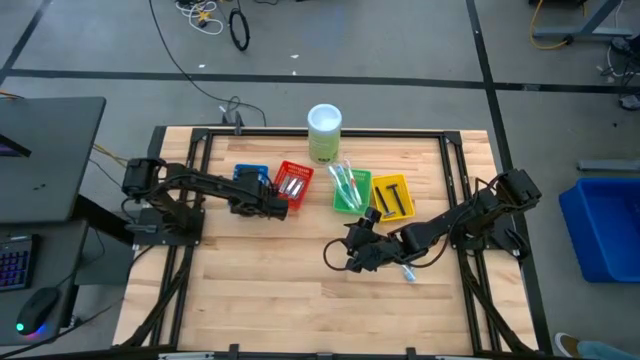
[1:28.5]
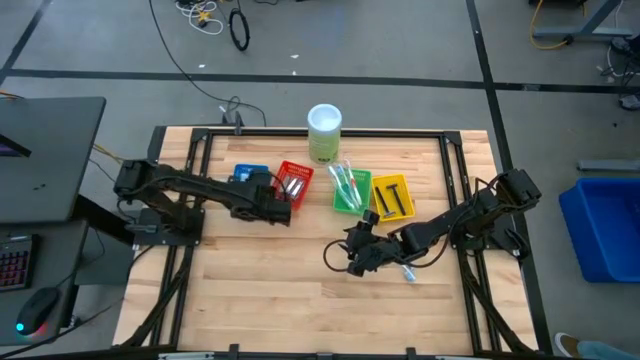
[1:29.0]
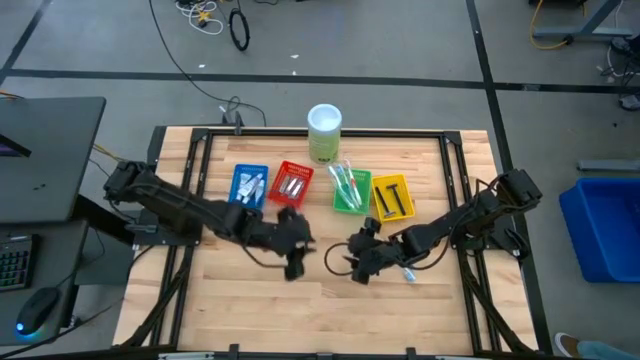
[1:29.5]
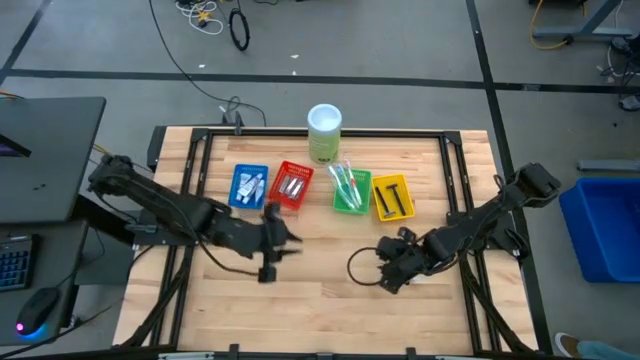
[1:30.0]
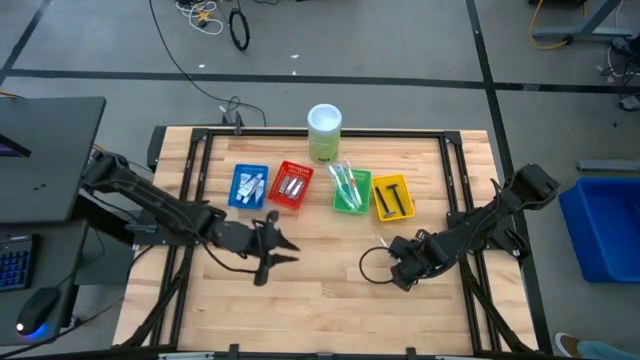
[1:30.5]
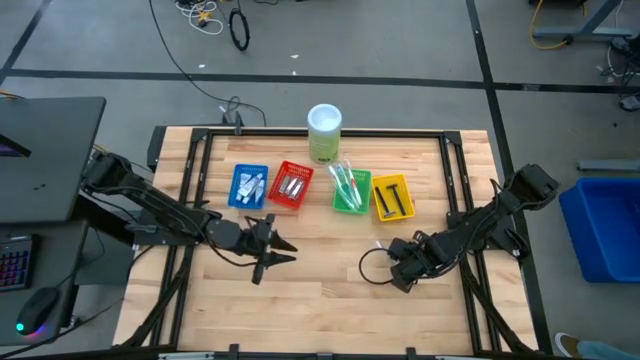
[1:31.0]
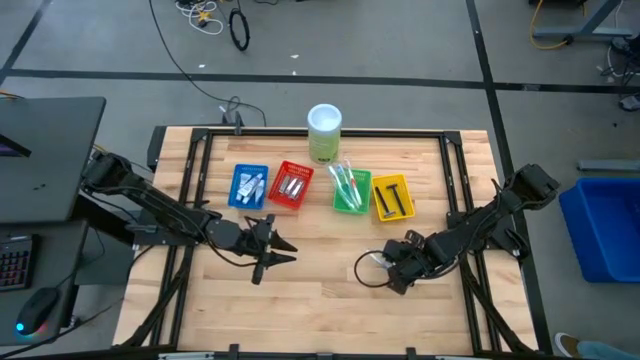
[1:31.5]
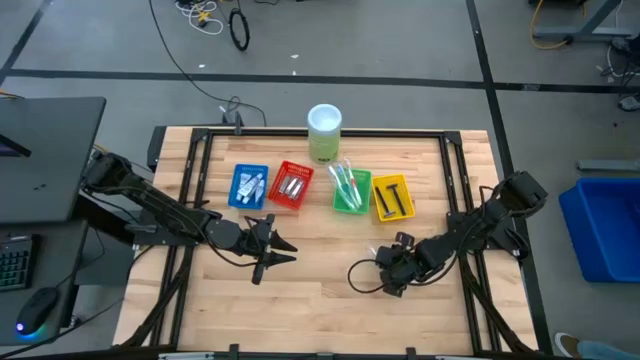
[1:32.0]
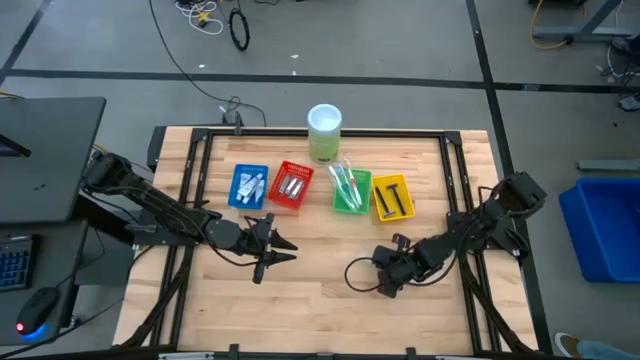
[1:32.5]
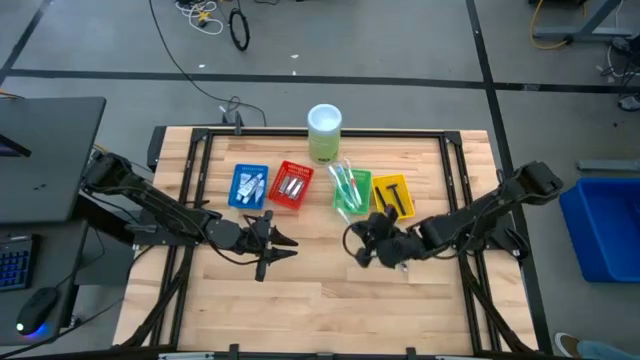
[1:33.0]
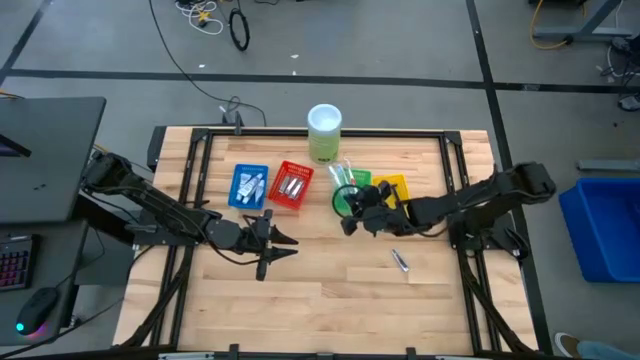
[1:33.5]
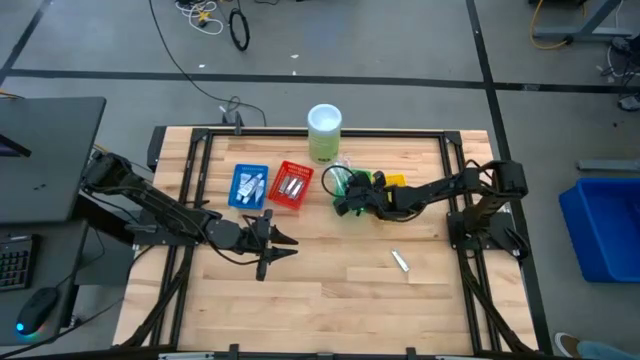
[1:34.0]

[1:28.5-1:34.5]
Task: Pick & Place Travel size toiletries
Put the blue toothbrush into the green basket

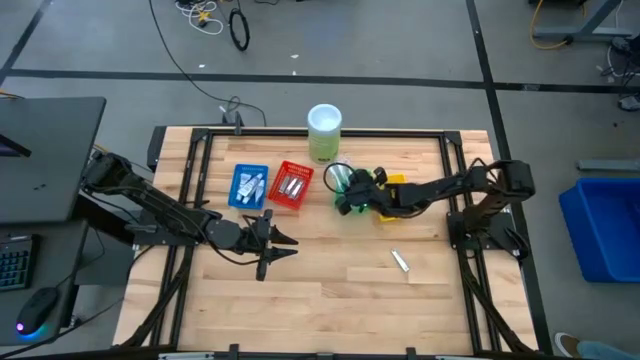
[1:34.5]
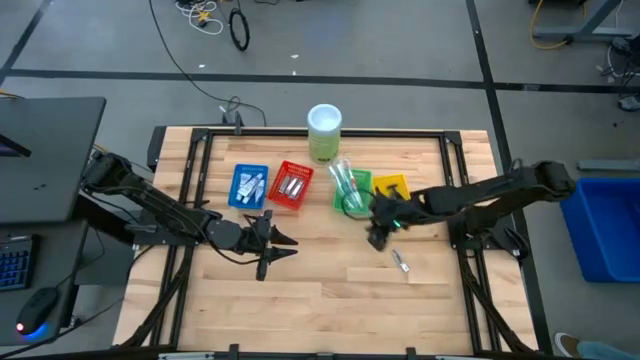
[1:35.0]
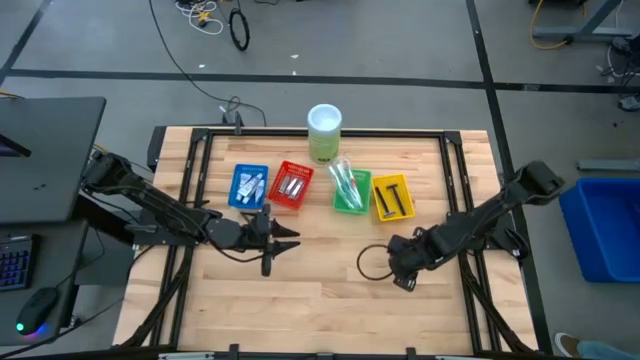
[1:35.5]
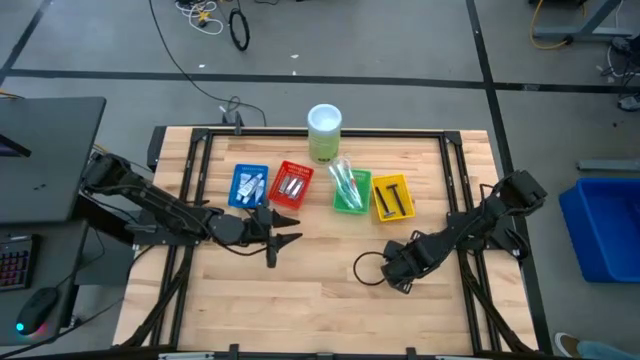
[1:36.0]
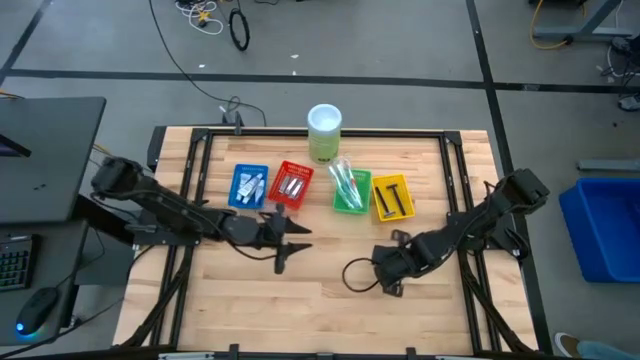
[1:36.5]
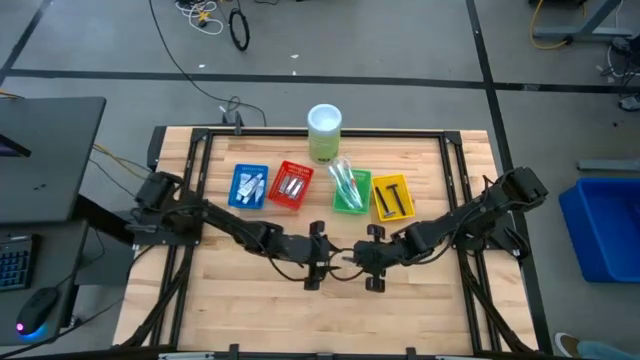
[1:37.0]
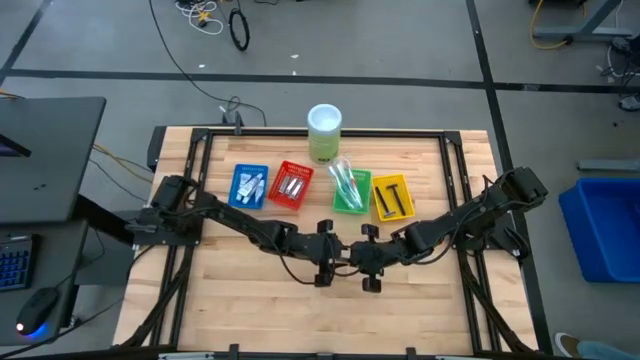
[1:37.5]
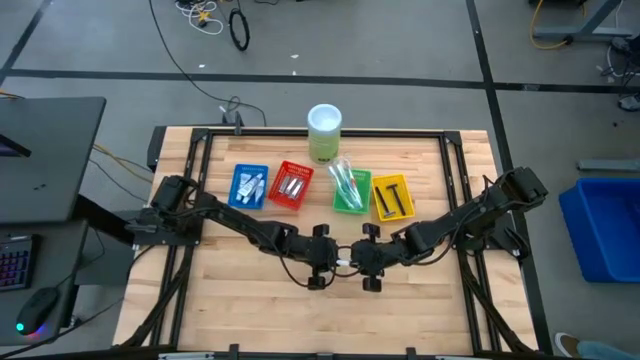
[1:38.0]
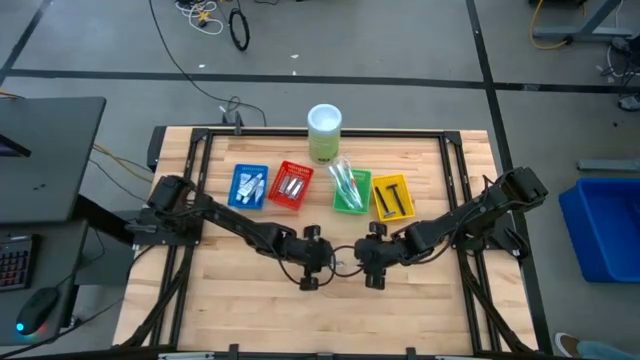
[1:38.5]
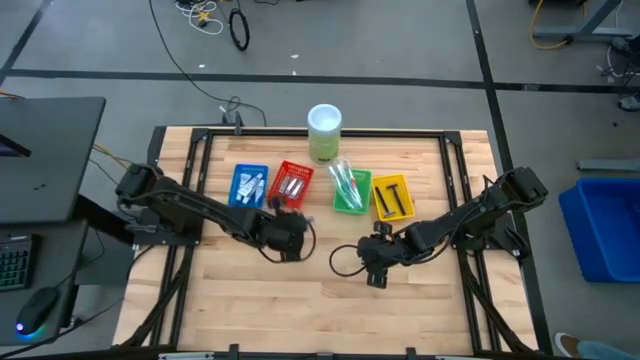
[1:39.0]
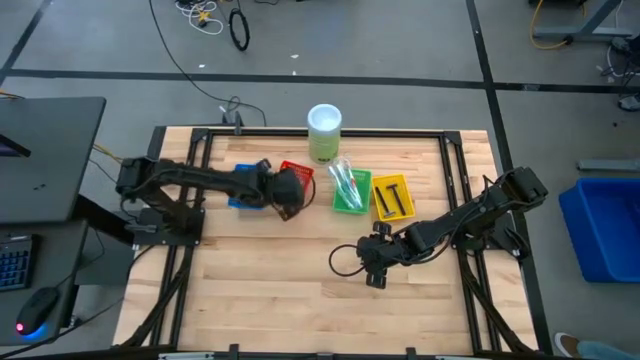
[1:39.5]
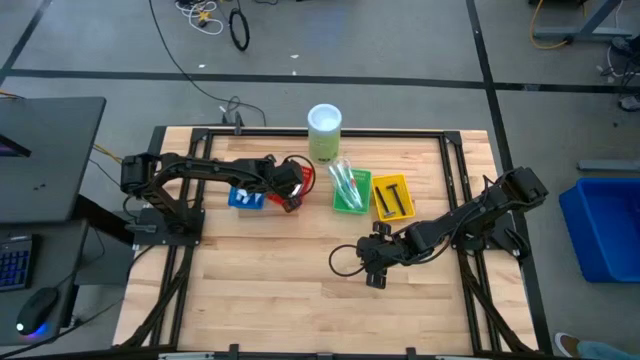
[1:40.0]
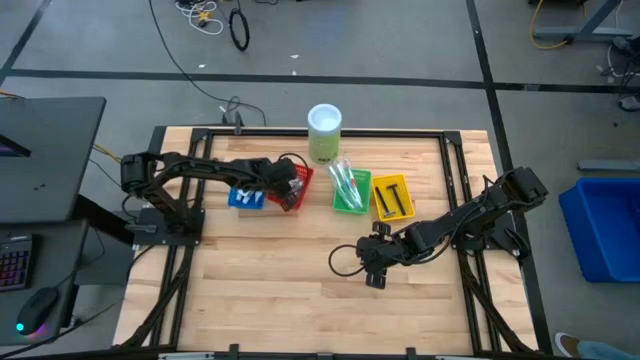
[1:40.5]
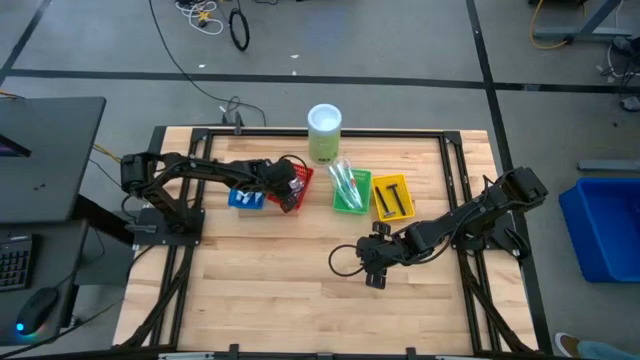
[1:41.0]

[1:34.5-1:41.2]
Put the silver nail cutter into the red basket

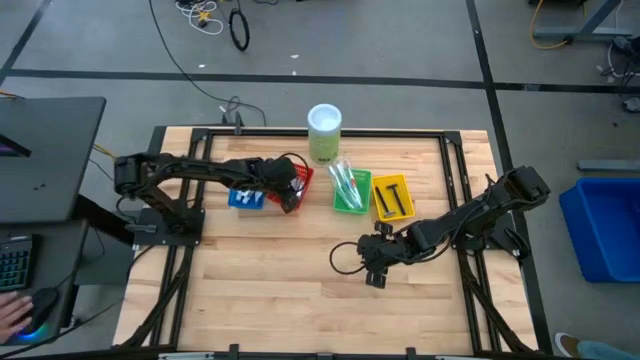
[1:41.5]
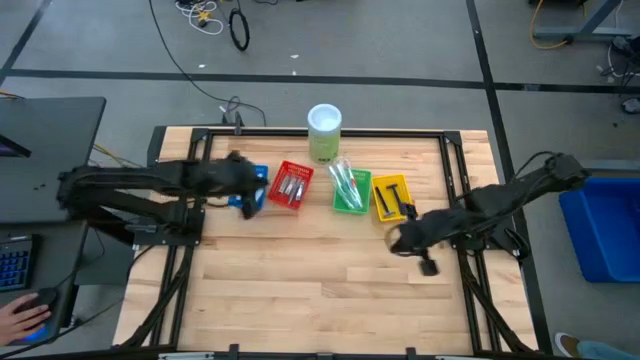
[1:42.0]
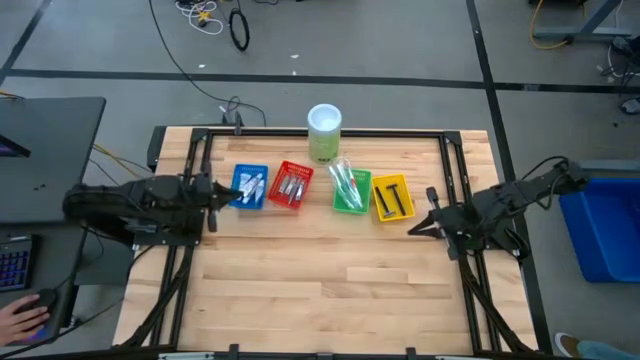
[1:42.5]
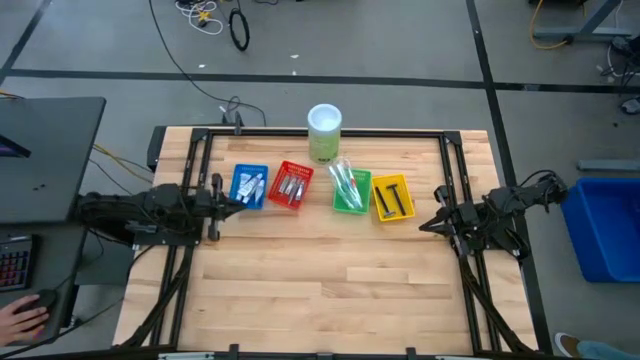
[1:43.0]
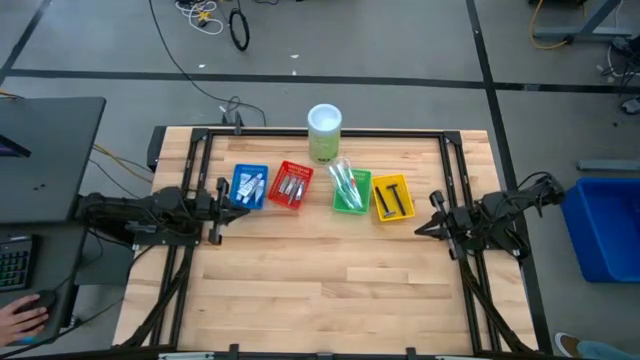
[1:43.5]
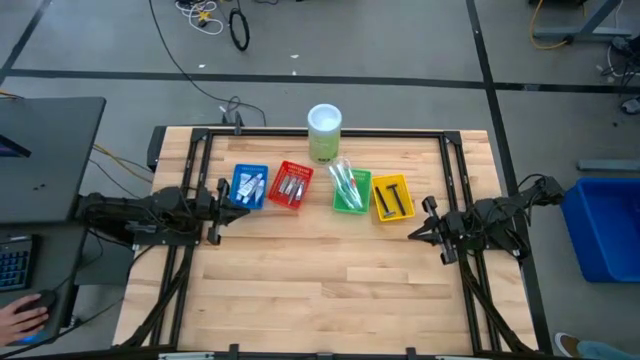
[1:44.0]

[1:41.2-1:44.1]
Return to Home Position

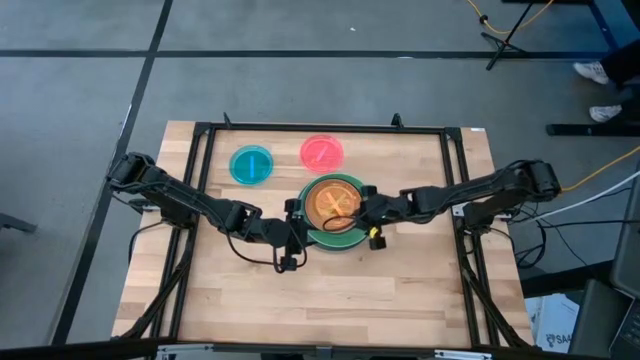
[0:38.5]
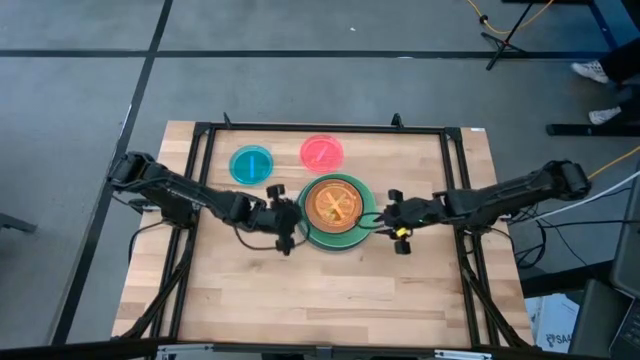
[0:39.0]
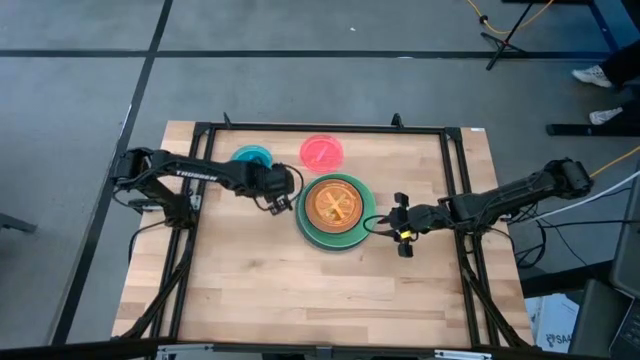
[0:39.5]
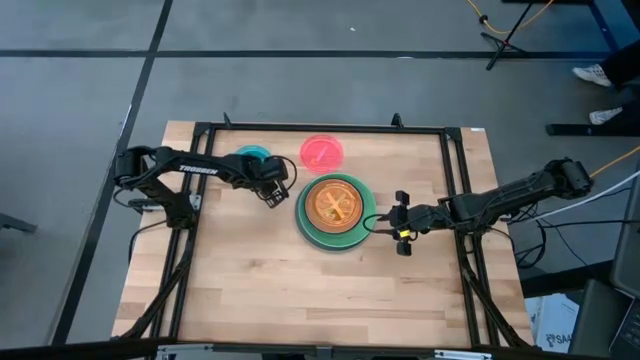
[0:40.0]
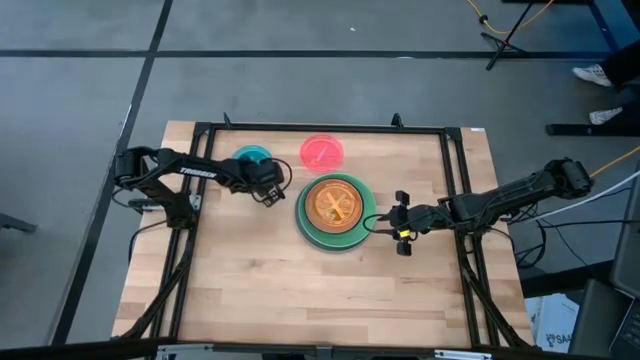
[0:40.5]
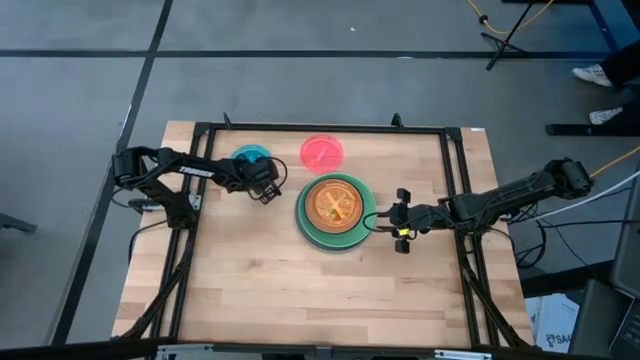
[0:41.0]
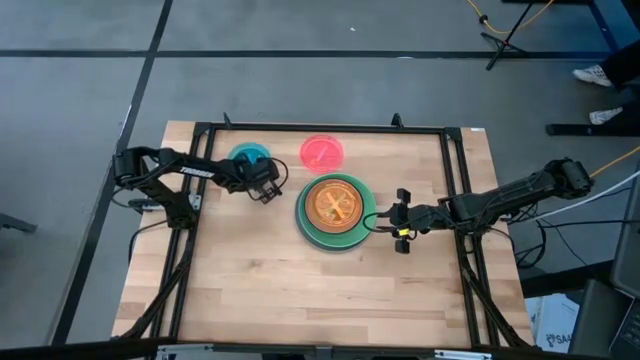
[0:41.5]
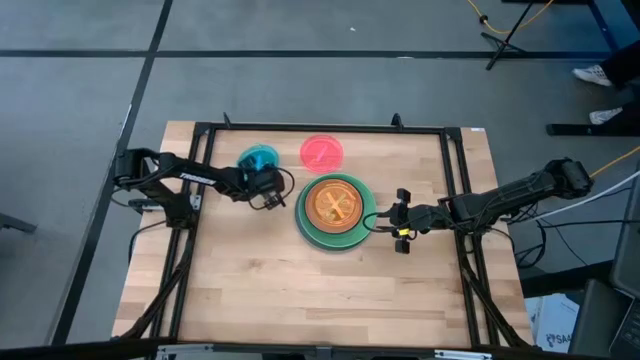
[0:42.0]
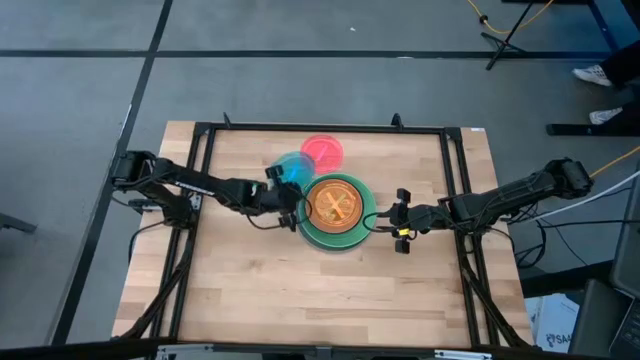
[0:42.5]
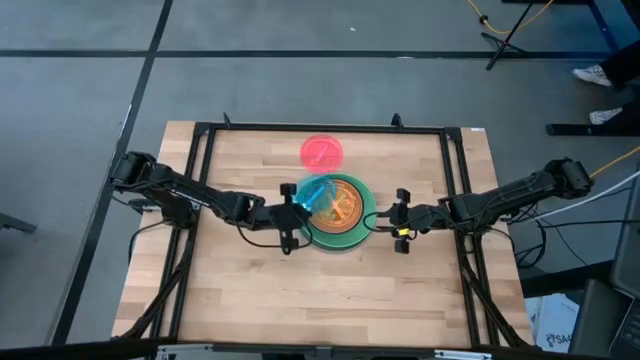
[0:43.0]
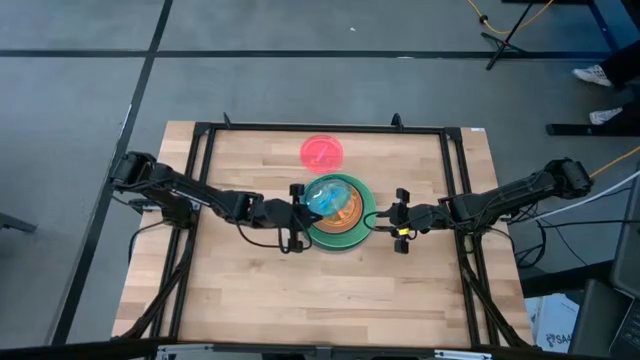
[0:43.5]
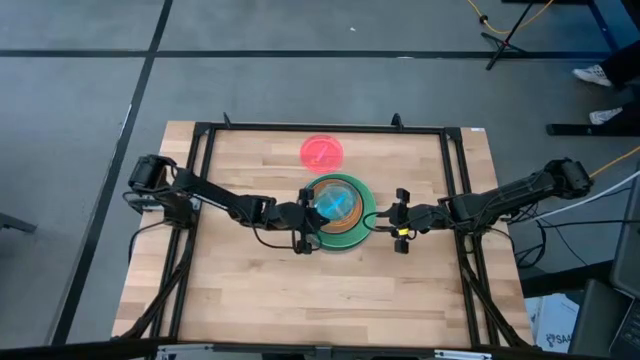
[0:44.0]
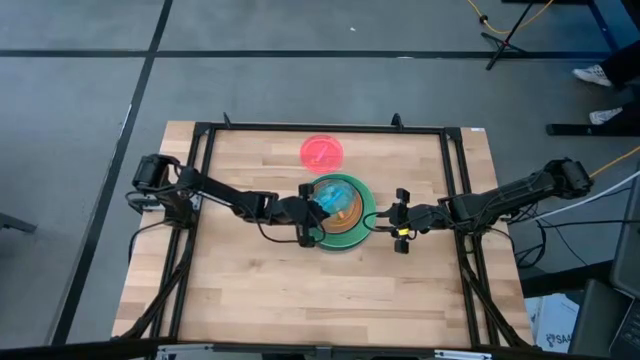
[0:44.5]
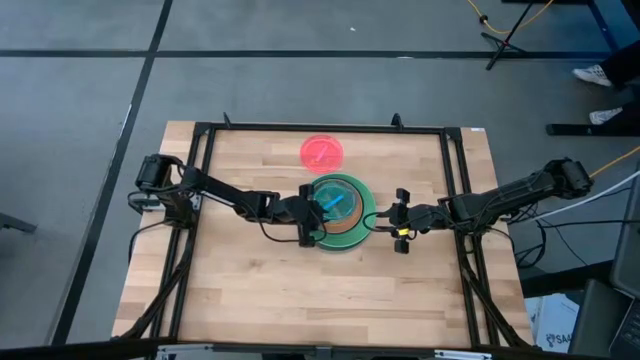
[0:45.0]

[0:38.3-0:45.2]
Task: Stack plastic plates
Stack the blue plate on top of the orange plate
